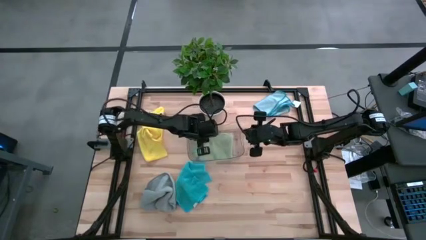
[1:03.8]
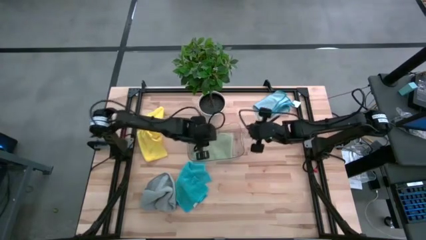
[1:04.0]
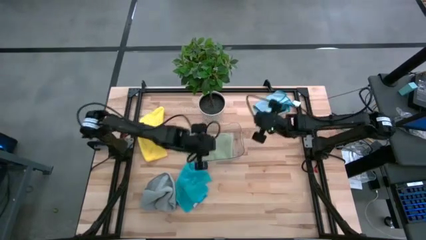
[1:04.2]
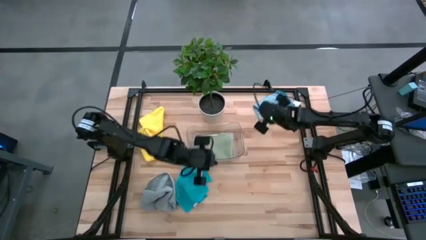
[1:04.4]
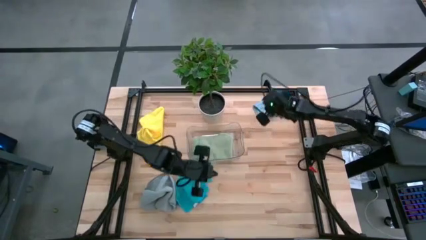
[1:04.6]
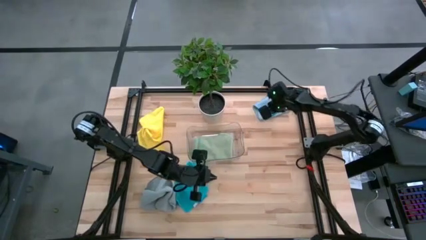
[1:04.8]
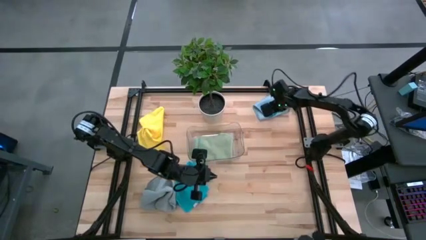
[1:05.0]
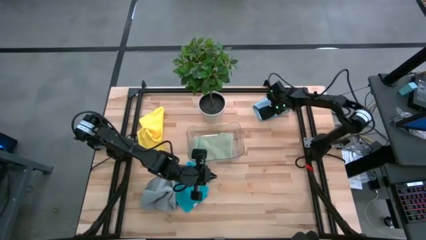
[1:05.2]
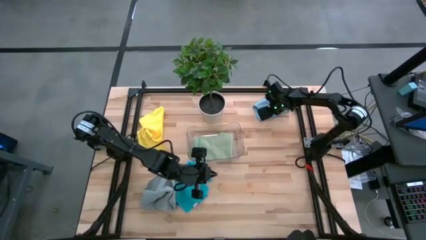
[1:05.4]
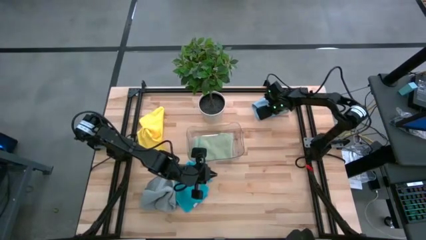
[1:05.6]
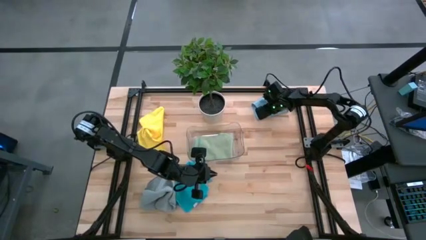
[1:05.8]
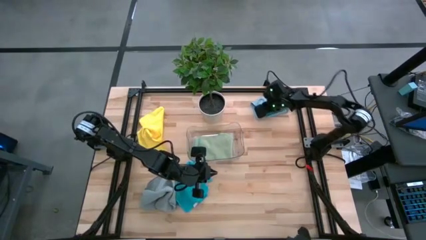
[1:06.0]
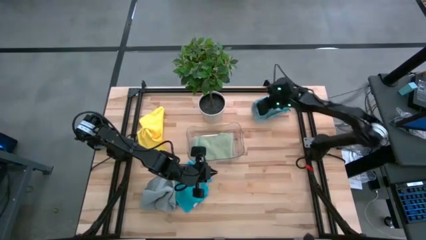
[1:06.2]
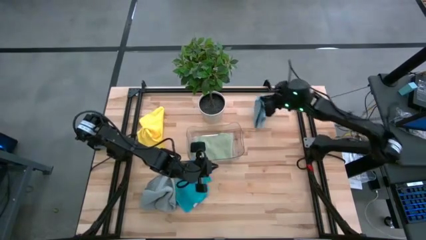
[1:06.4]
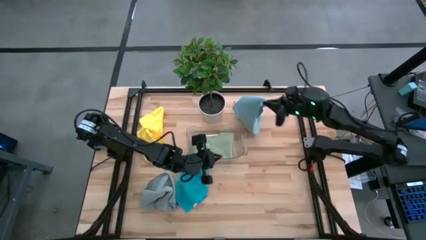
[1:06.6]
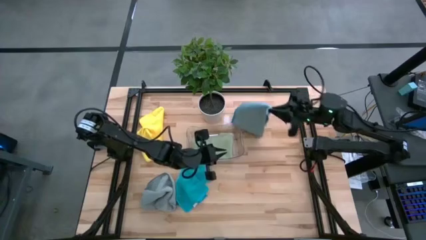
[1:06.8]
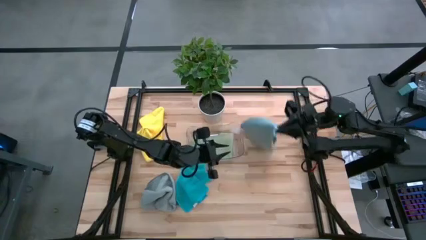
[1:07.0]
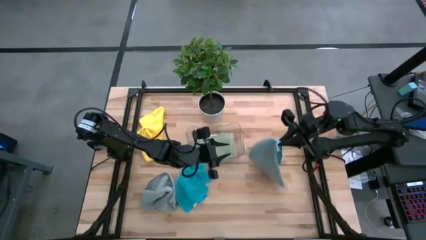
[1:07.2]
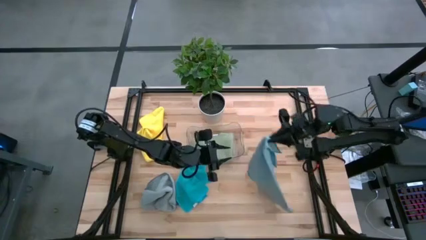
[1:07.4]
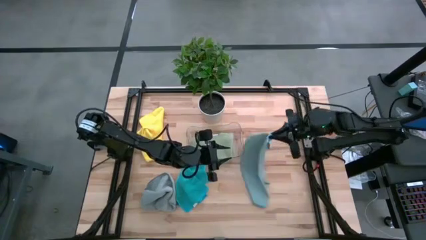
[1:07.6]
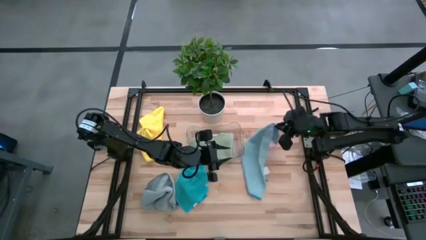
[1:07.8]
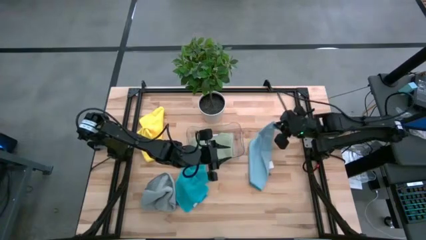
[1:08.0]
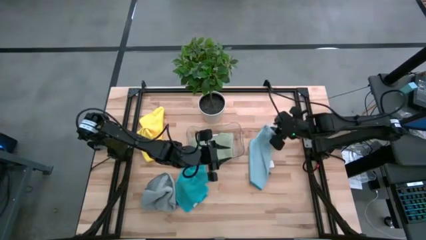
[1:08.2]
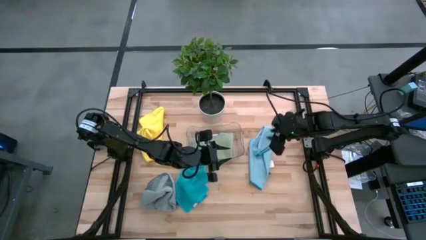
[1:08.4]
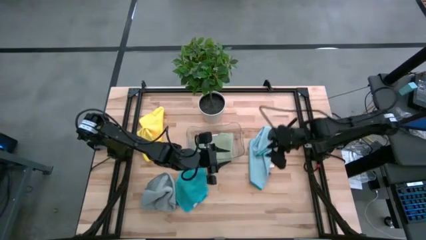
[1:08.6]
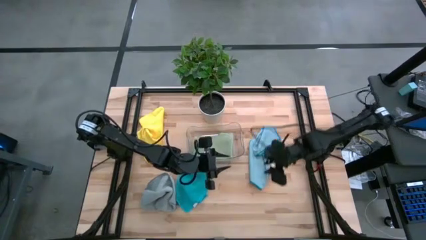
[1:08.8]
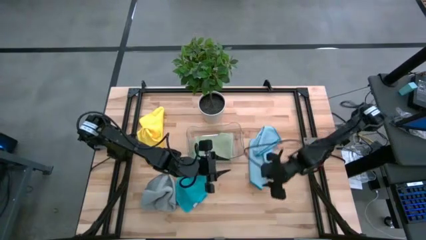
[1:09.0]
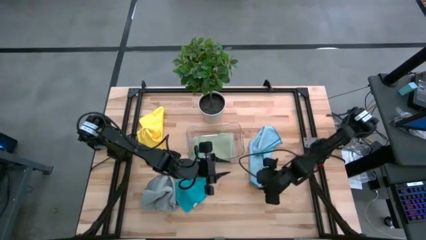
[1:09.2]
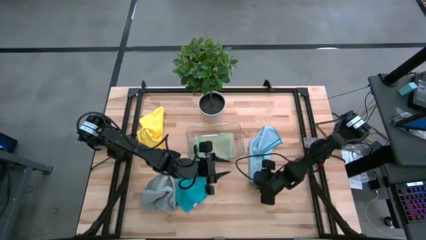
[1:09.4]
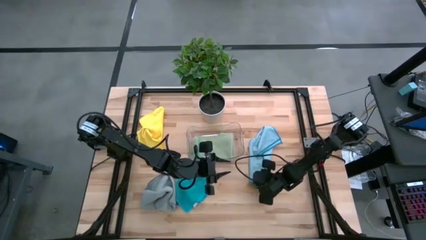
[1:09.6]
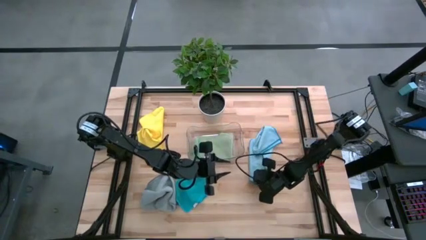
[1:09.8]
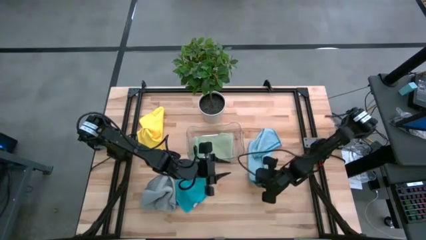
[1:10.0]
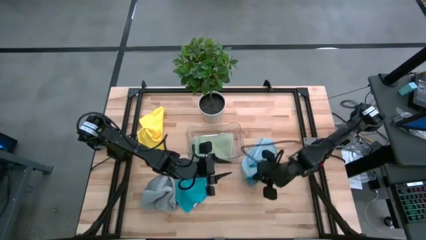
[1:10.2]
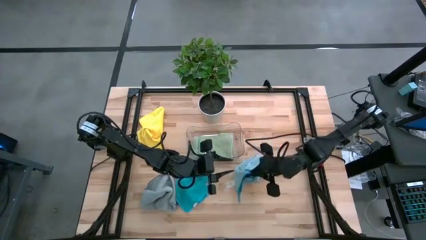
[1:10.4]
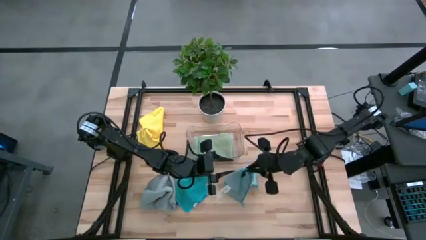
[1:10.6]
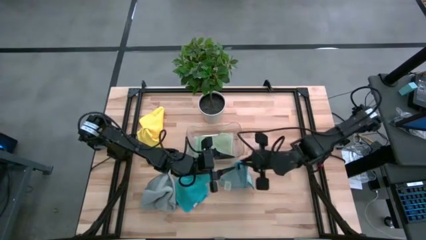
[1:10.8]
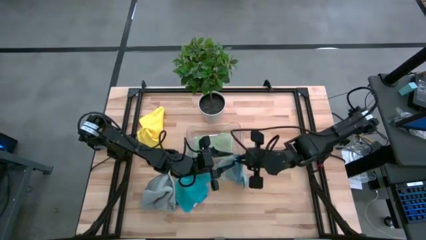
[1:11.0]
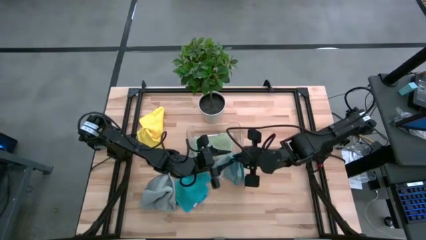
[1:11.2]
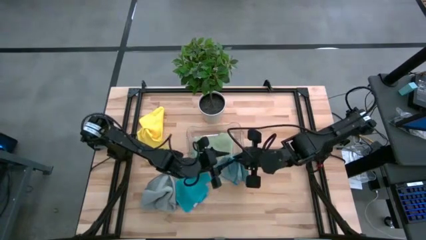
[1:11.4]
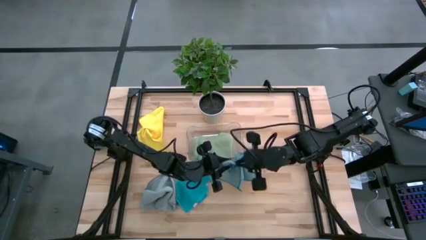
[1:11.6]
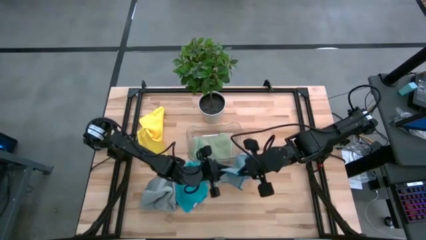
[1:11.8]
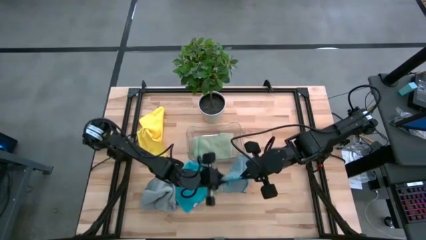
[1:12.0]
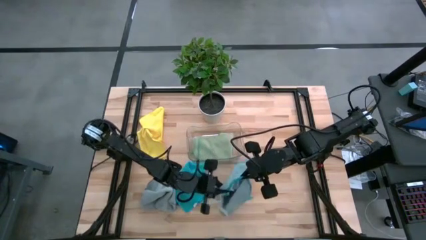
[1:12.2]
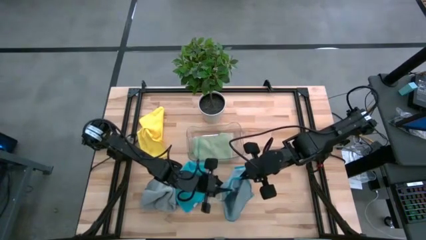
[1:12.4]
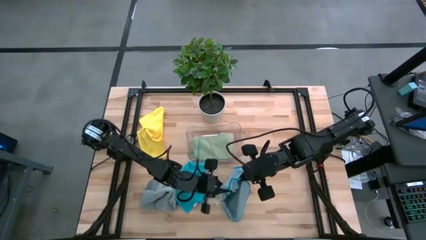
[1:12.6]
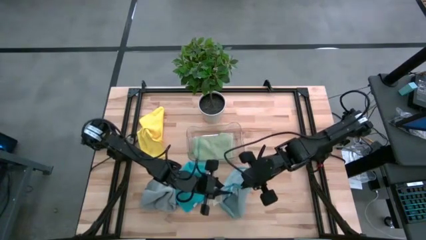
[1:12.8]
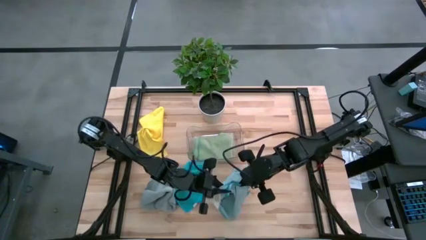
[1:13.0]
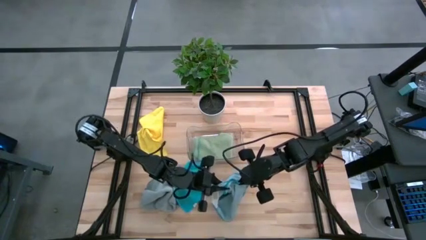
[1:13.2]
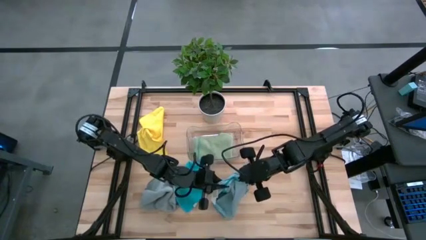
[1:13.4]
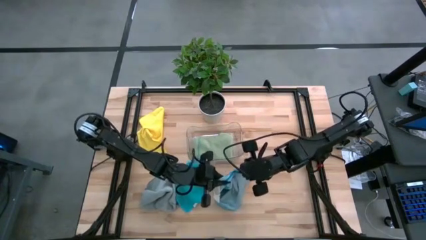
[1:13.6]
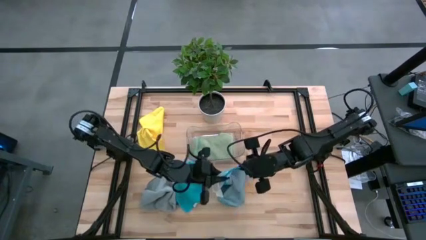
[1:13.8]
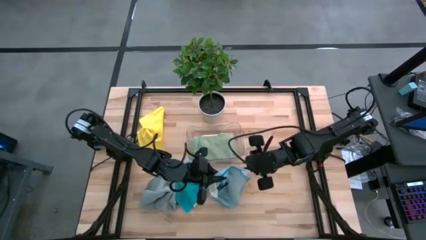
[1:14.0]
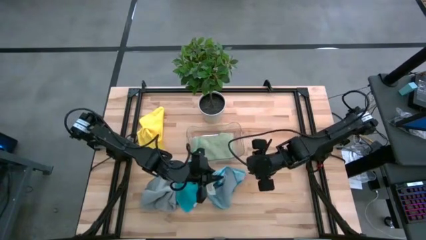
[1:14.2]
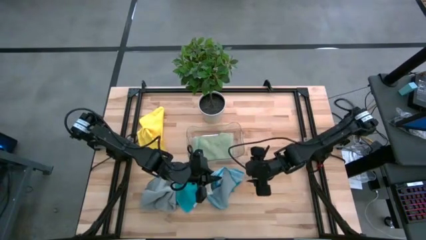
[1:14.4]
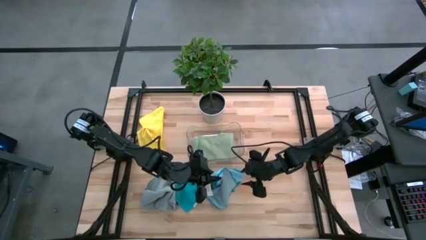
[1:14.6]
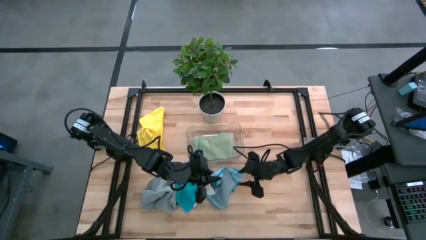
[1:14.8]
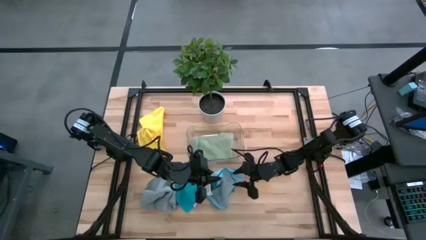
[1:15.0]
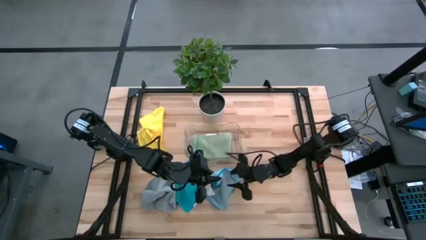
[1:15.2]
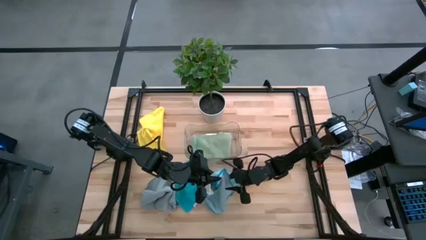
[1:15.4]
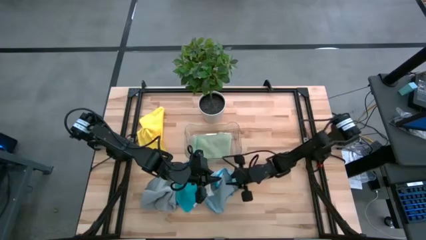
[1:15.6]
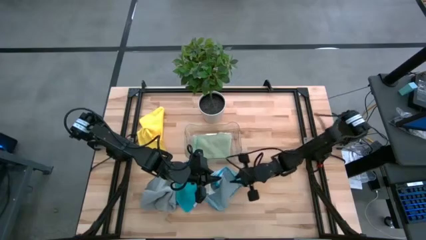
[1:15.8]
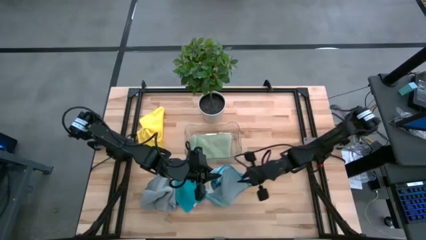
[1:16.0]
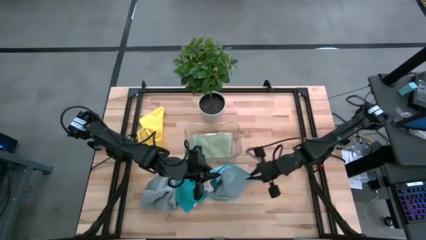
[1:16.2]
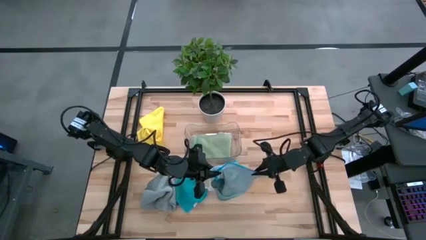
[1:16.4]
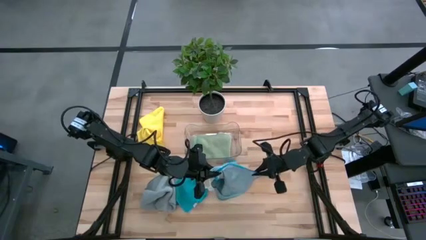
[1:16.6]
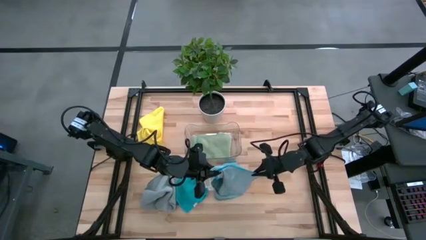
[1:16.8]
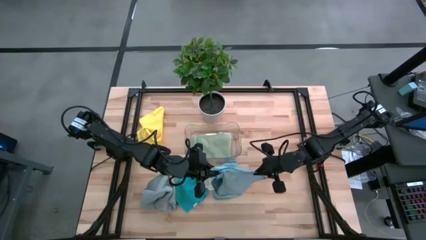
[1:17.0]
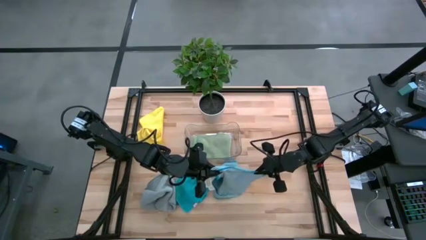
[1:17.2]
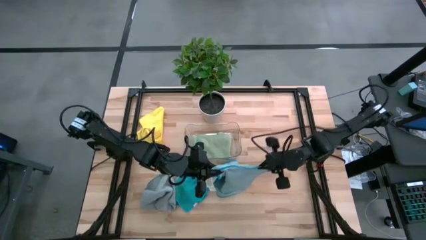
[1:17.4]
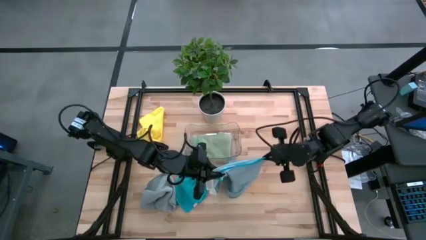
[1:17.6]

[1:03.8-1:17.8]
Task: Fold microfiber towels
Fold the light blue microfiber cloth
